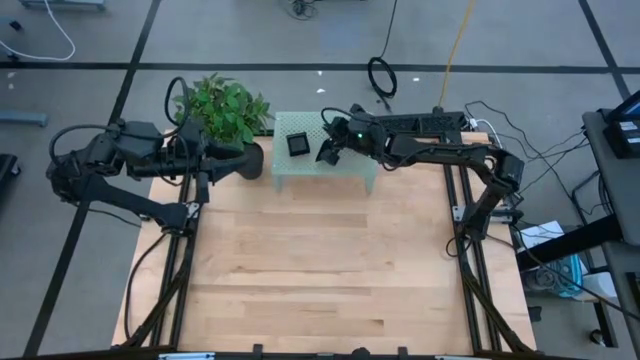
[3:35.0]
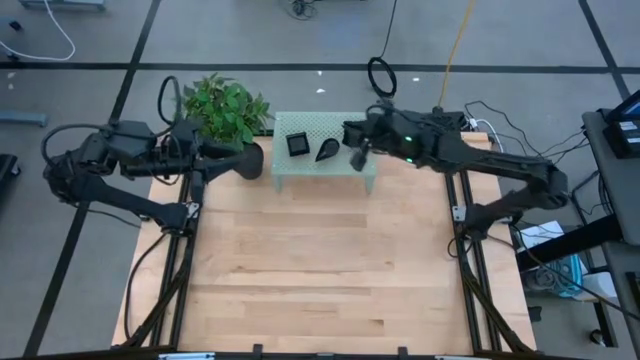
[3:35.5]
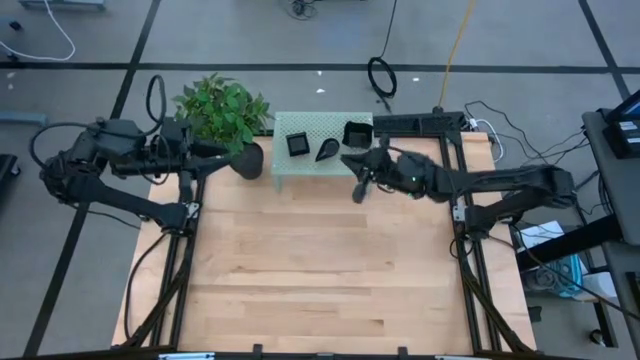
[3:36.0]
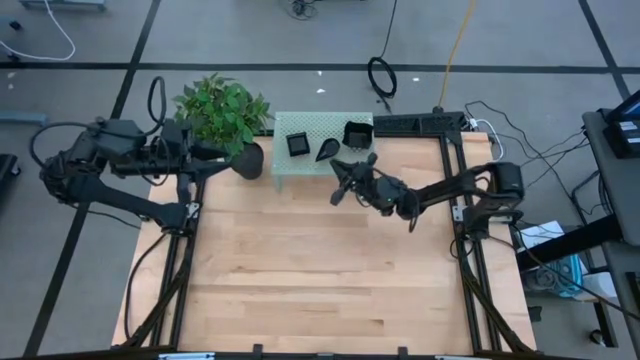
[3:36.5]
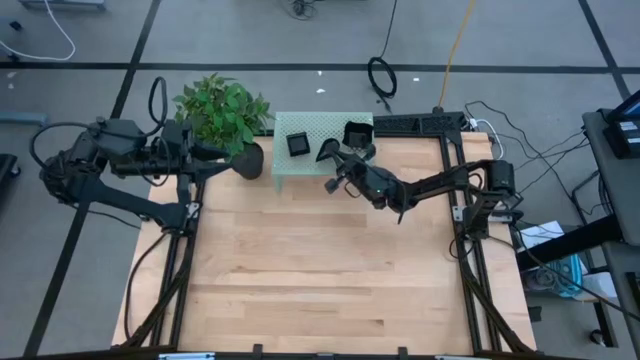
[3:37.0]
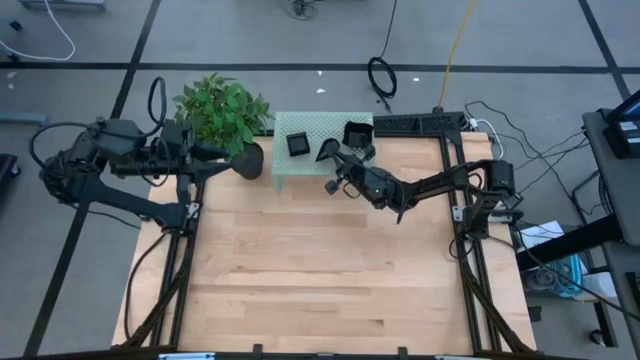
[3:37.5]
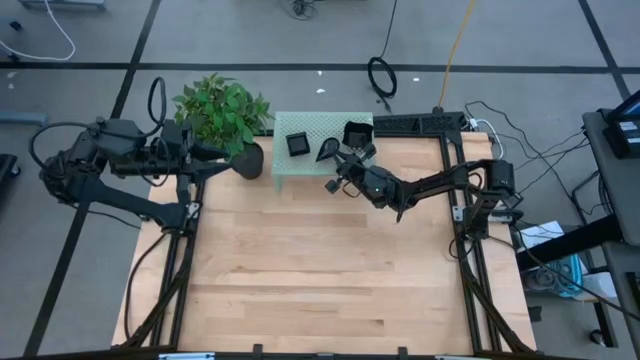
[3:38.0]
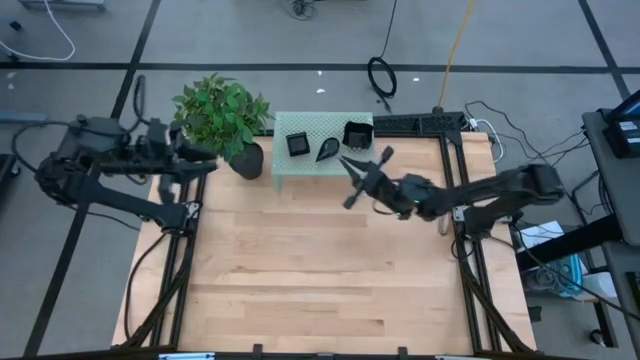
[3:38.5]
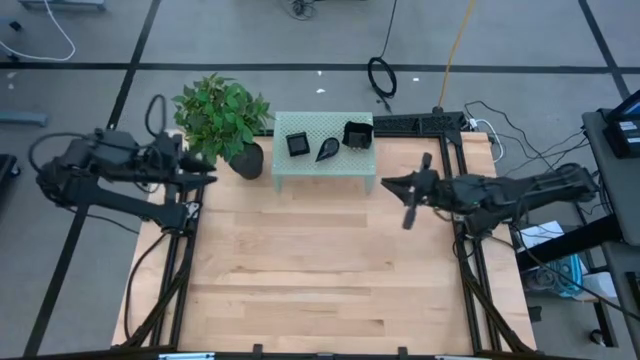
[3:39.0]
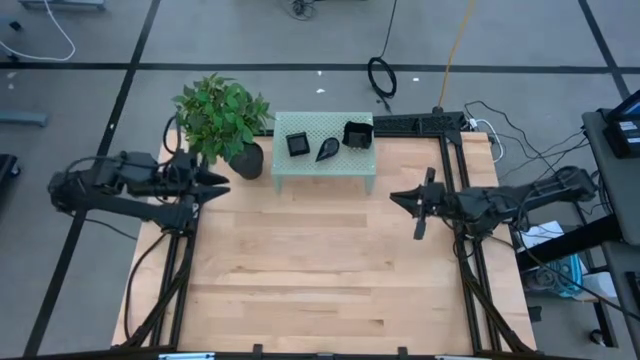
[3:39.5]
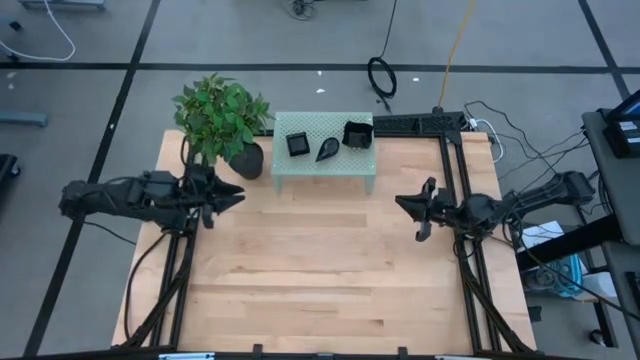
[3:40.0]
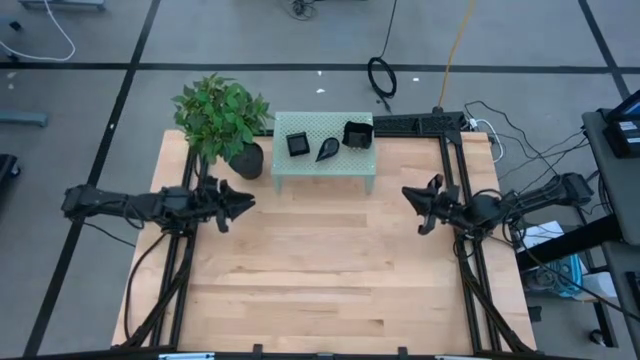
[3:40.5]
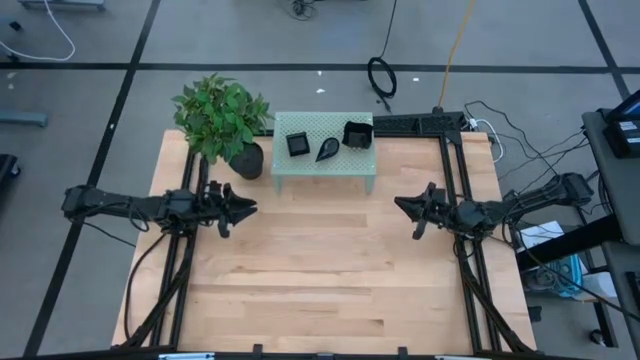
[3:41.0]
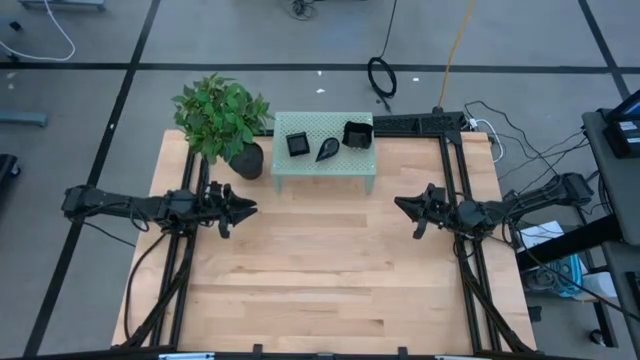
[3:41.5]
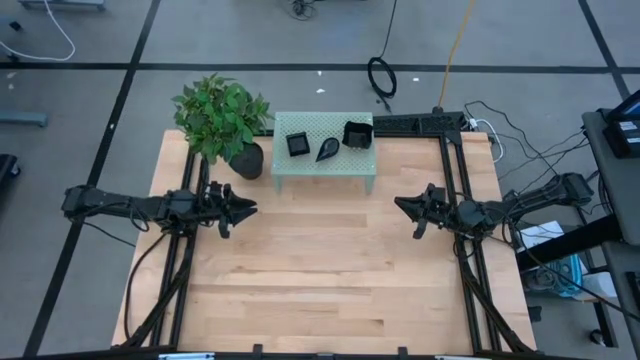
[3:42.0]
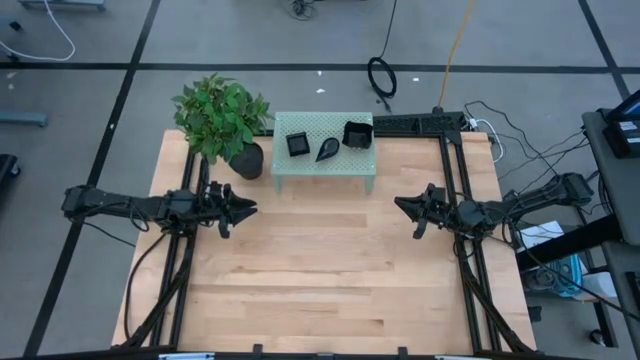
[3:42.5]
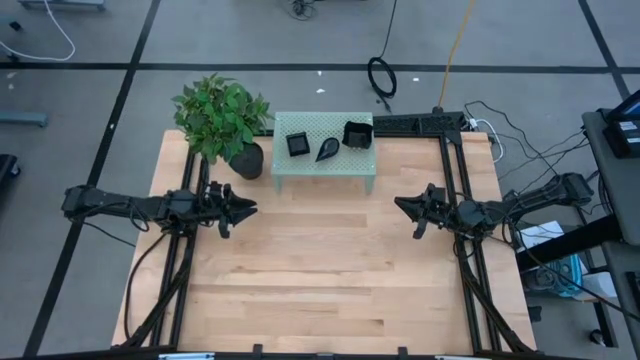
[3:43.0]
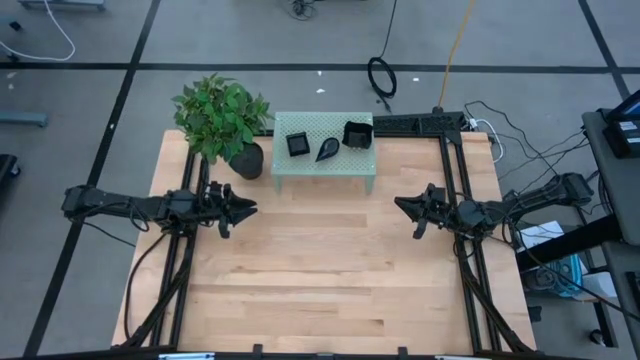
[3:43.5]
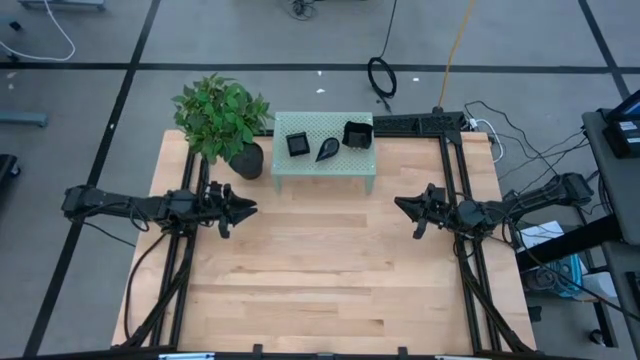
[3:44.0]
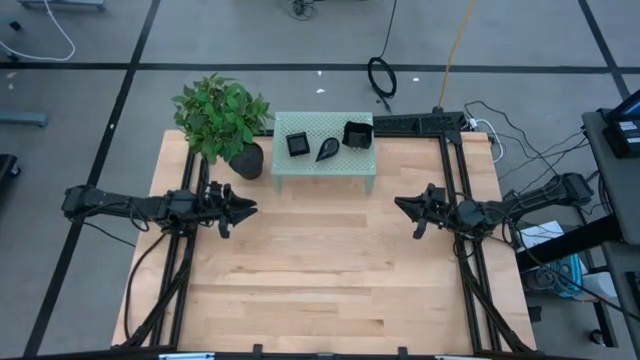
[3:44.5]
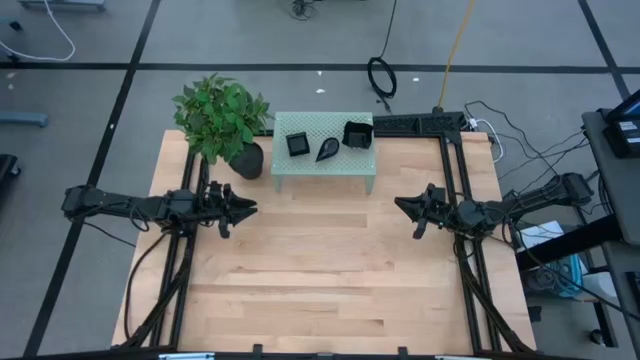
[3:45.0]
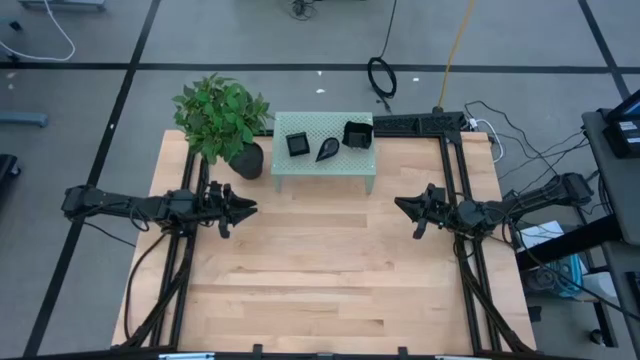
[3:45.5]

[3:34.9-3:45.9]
Task: Pick & Place Mini shaped plates
Return to Home Position

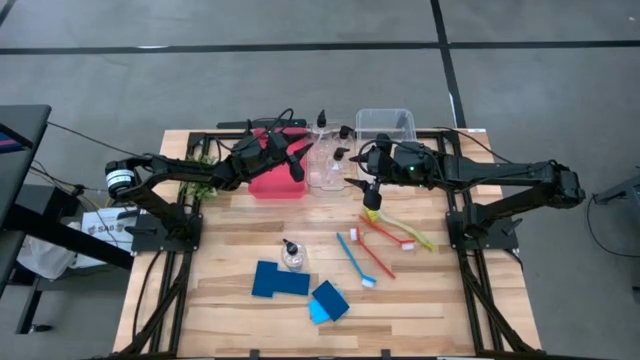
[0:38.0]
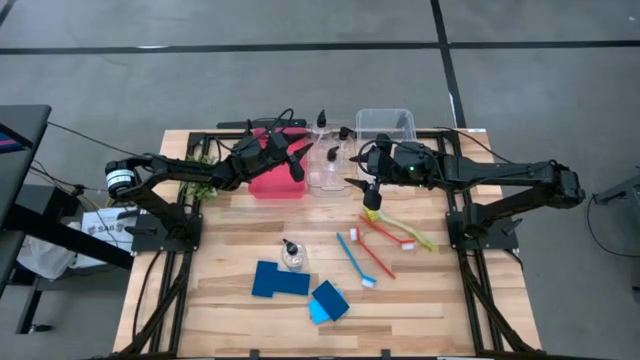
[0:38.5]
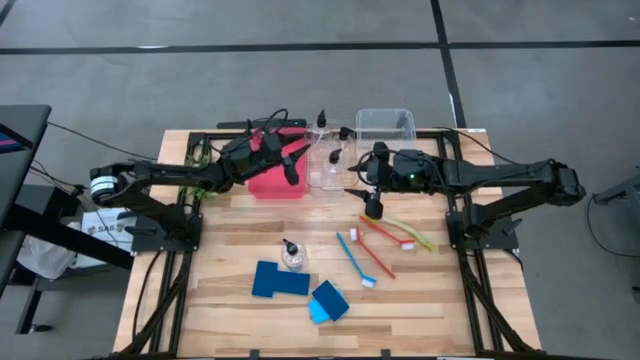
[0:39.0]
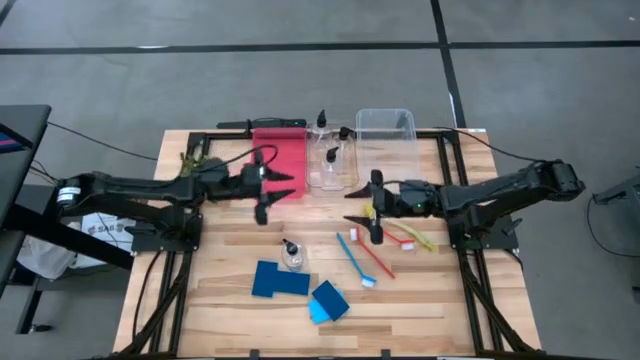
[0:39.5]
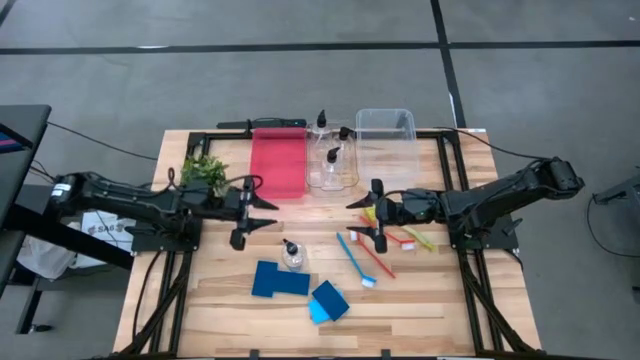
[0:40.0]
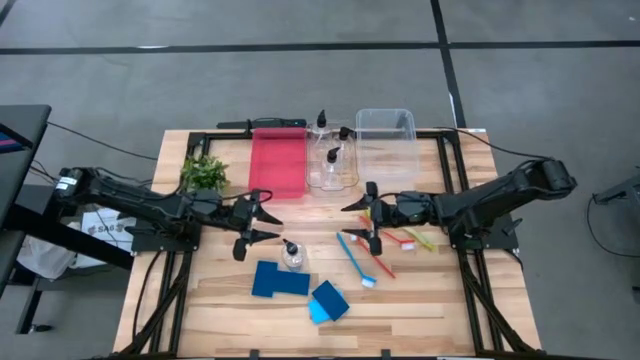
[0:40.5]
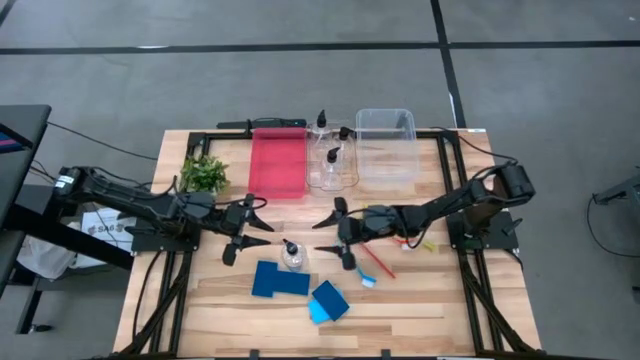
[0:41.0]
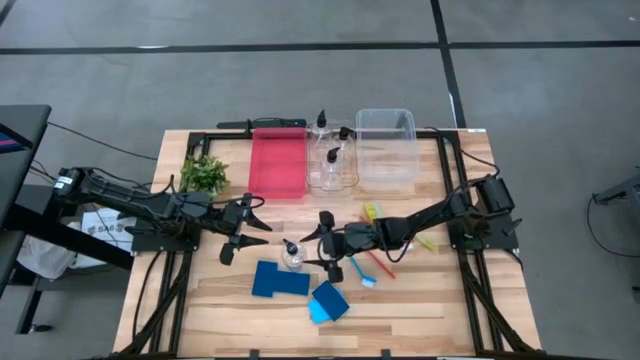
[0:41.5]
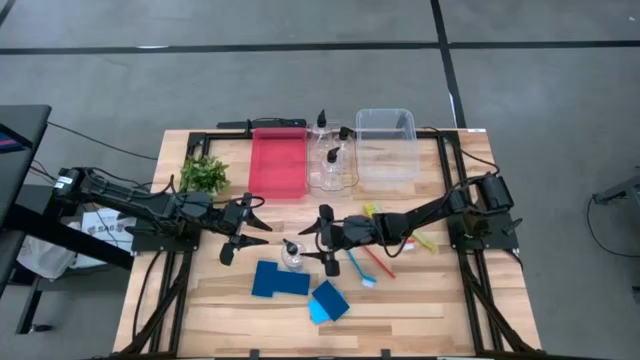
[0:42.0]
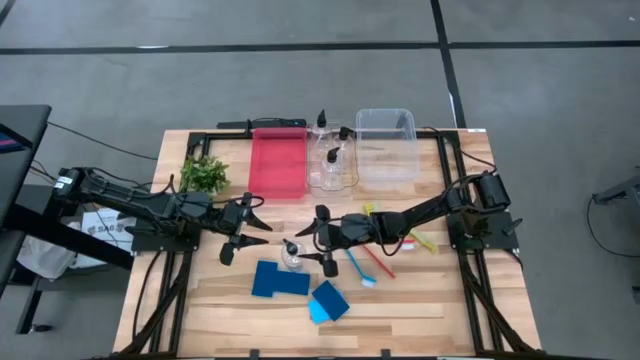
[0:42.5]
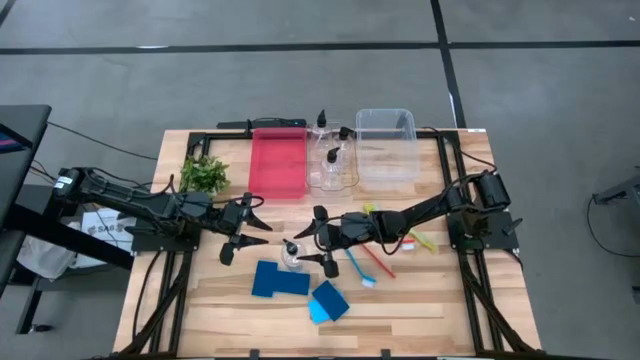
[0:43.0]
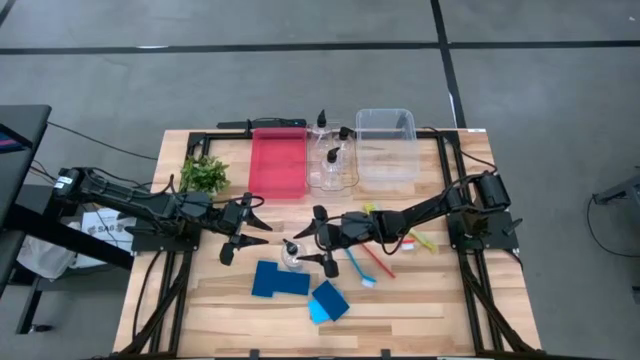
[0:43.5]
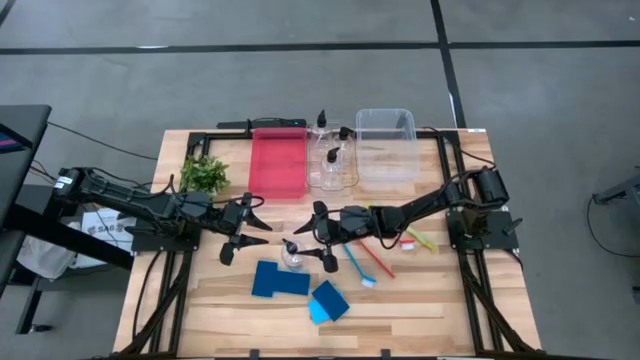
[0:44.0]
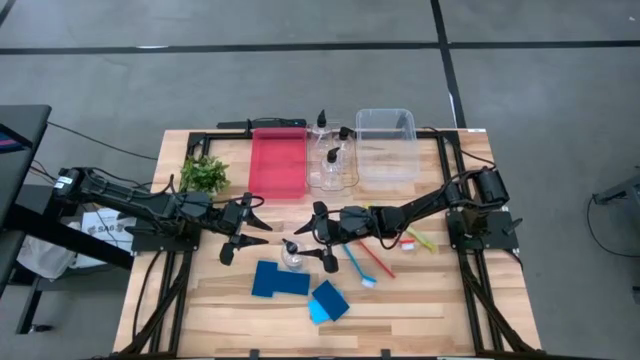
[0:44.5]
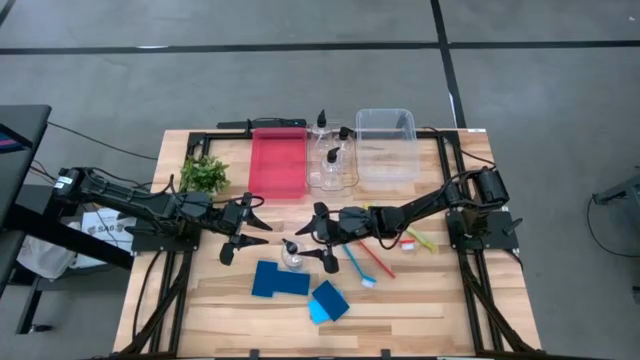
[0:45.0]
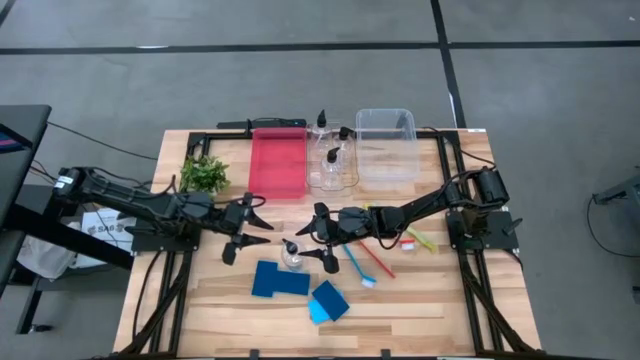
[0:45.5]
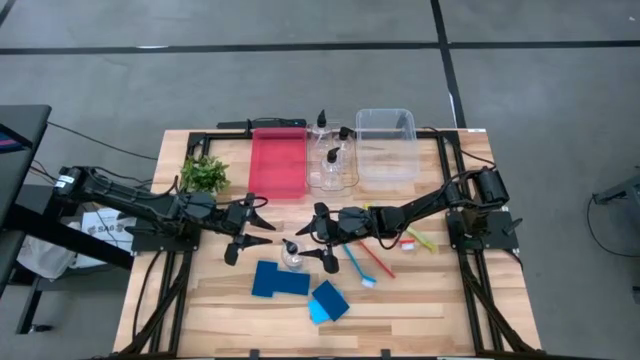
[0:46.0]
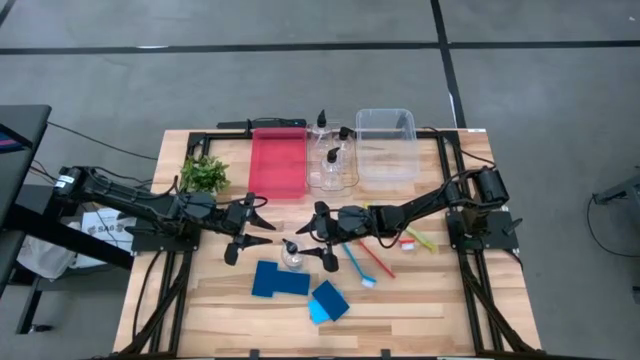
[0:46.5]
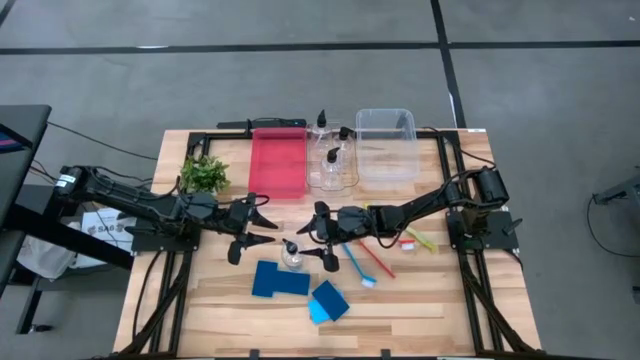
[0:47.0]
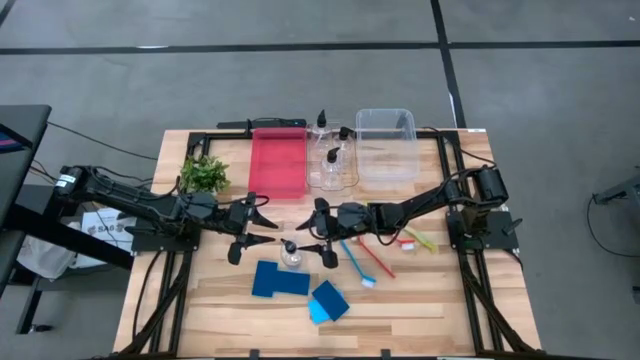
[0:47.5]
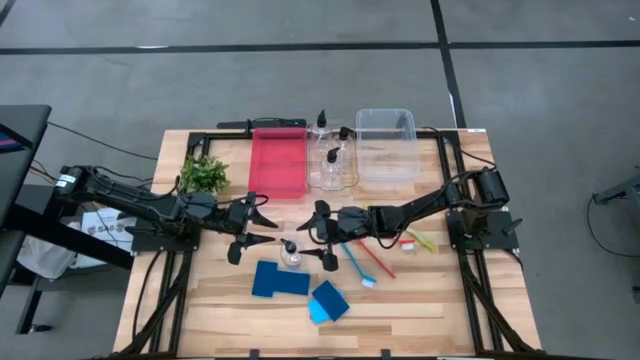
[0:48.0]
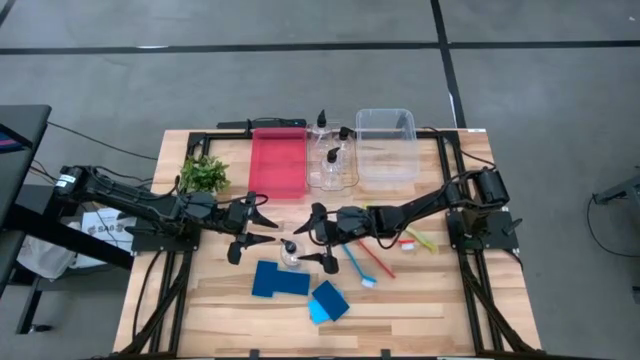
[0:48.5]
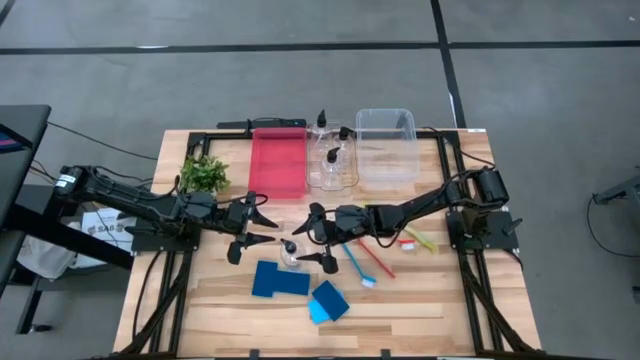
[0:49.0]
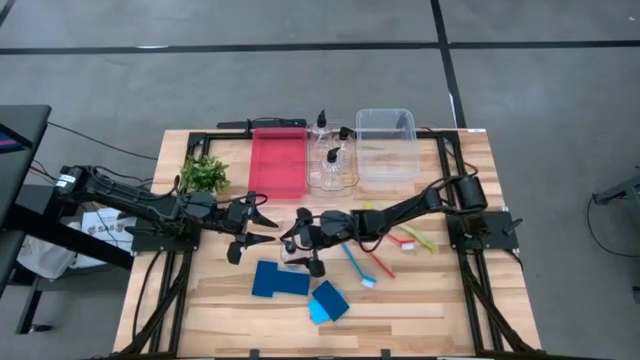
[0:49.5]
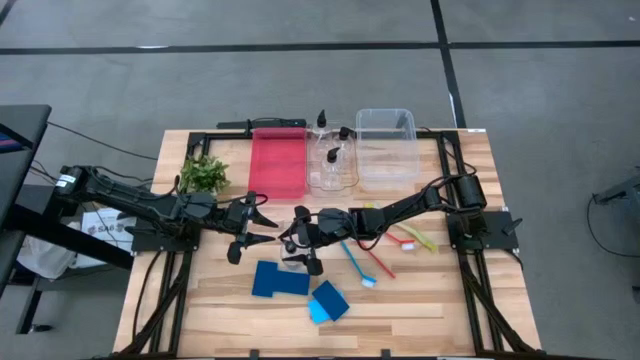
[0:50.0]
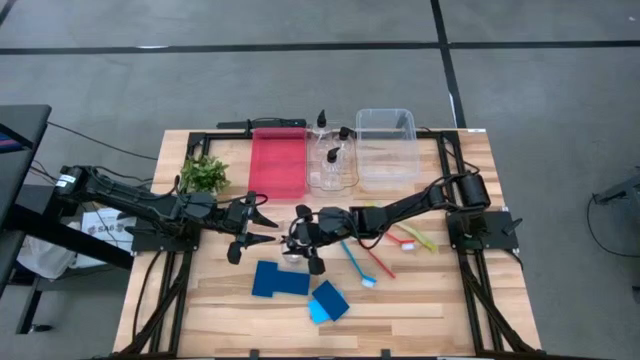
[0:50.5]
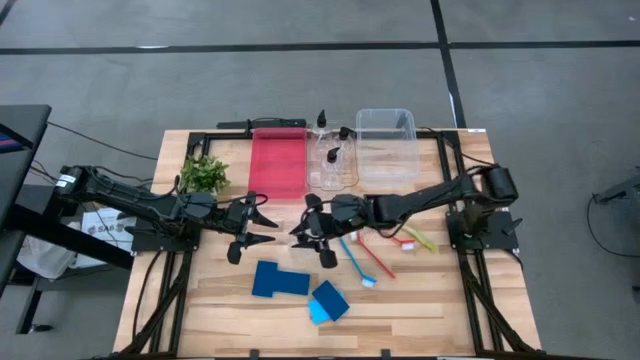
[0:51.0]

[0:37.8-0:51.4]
Task: Pick & Place Kitchen Sink Supplies
Put the soap dispenser into the left transparent bin
